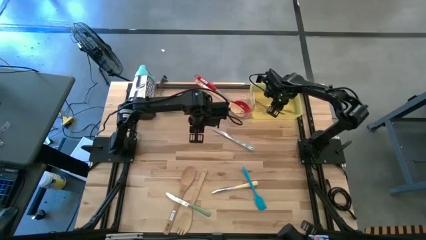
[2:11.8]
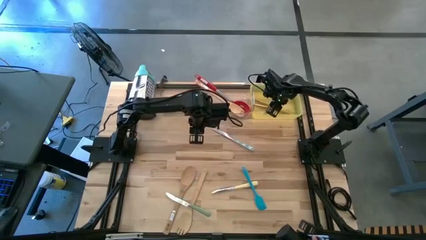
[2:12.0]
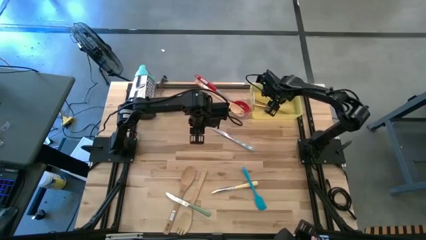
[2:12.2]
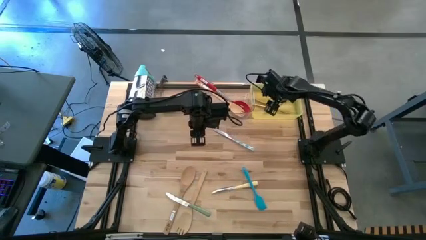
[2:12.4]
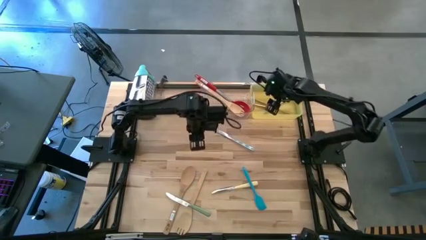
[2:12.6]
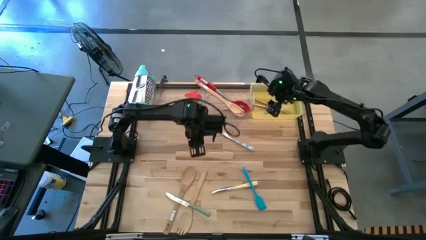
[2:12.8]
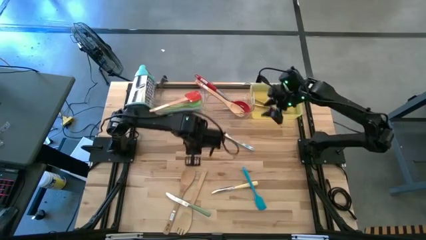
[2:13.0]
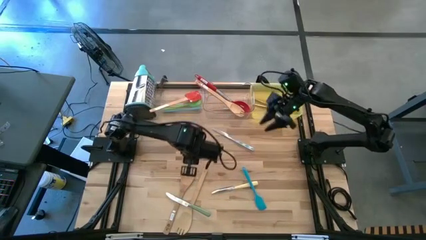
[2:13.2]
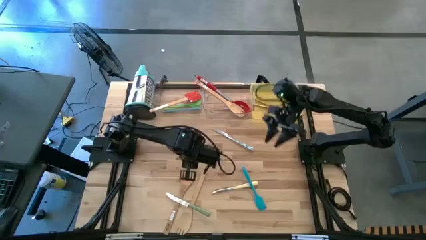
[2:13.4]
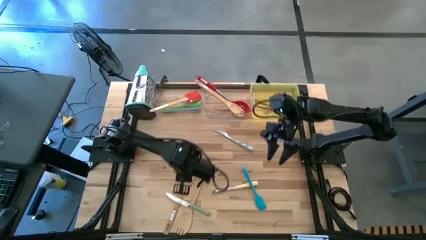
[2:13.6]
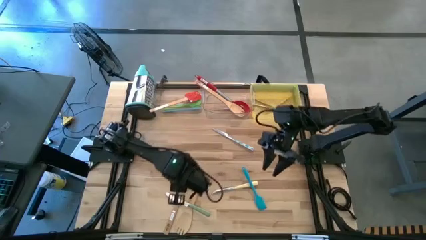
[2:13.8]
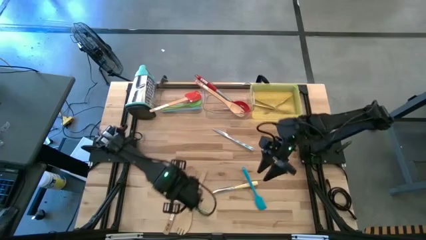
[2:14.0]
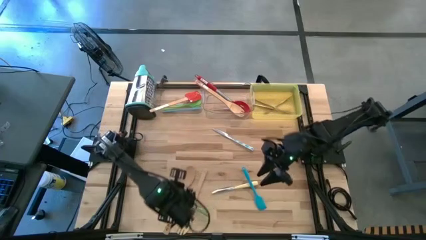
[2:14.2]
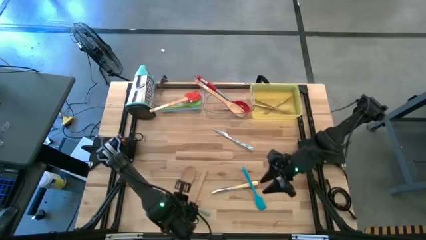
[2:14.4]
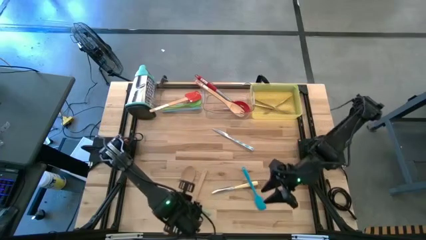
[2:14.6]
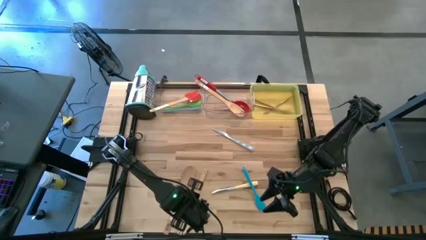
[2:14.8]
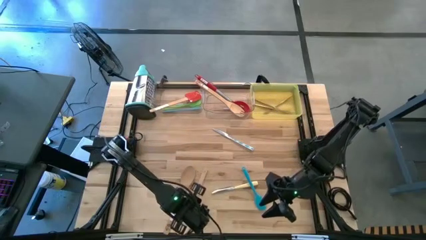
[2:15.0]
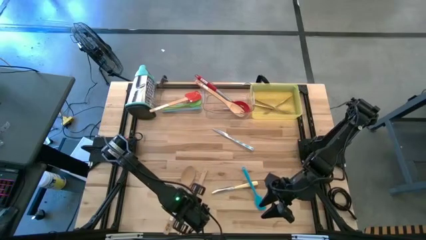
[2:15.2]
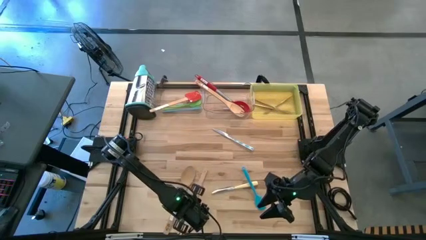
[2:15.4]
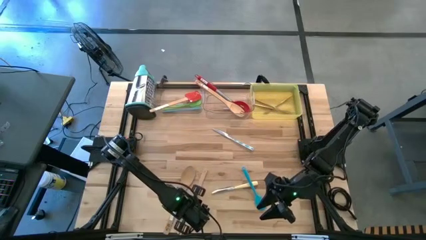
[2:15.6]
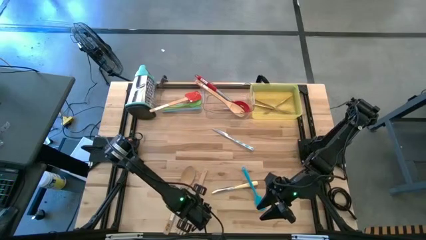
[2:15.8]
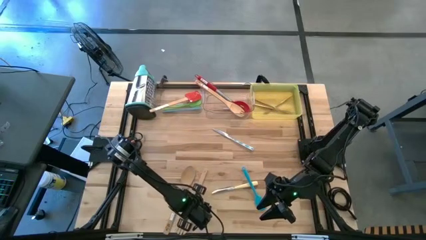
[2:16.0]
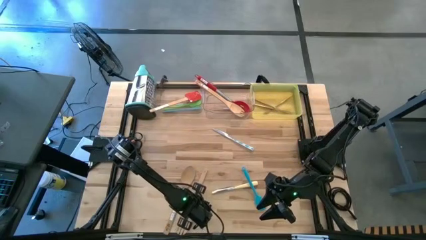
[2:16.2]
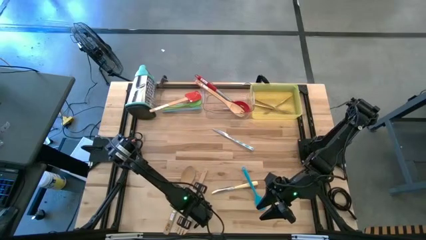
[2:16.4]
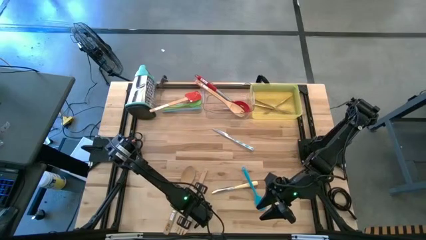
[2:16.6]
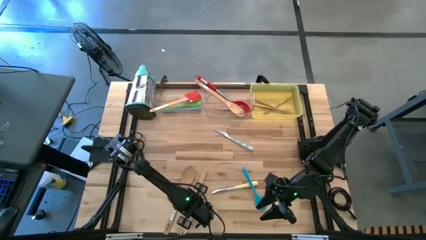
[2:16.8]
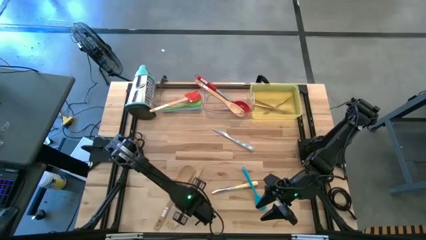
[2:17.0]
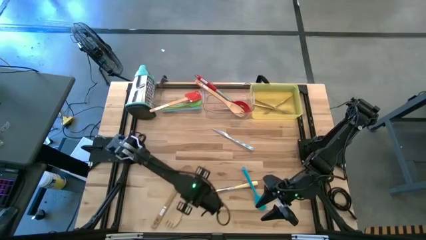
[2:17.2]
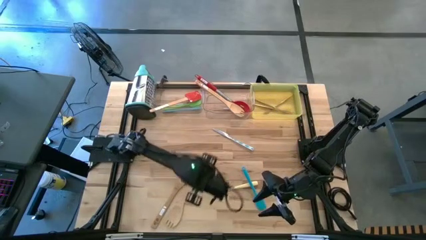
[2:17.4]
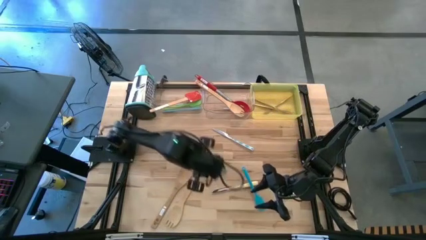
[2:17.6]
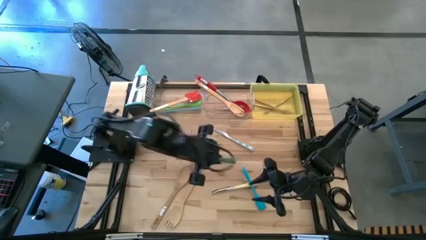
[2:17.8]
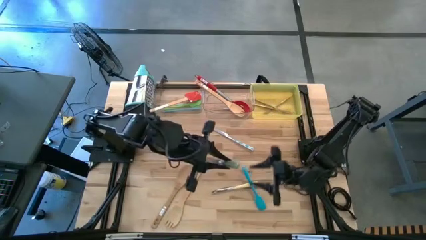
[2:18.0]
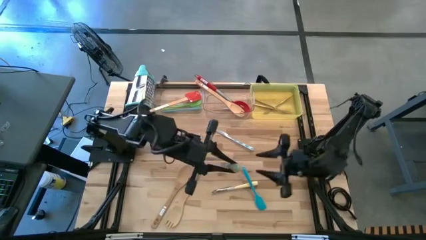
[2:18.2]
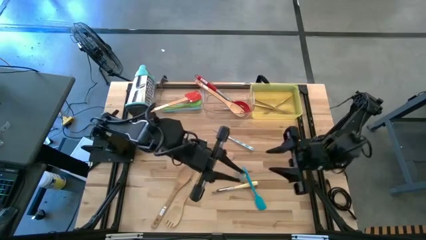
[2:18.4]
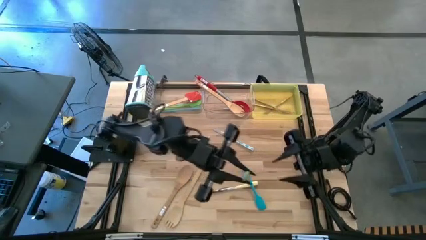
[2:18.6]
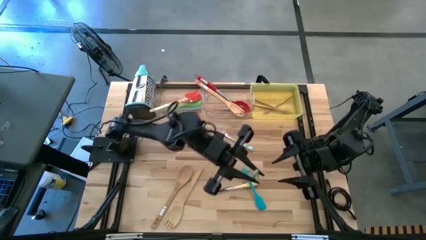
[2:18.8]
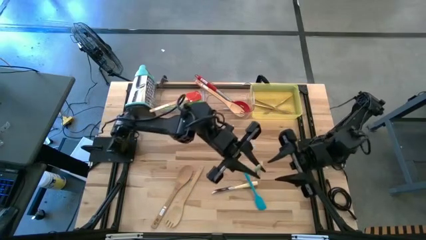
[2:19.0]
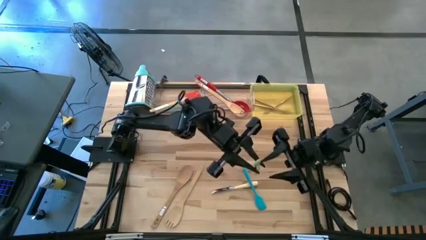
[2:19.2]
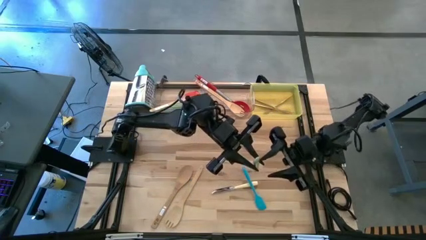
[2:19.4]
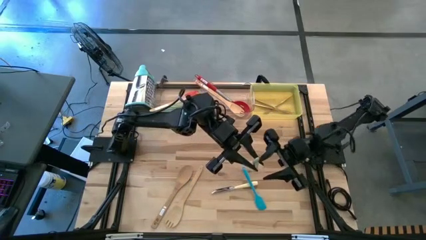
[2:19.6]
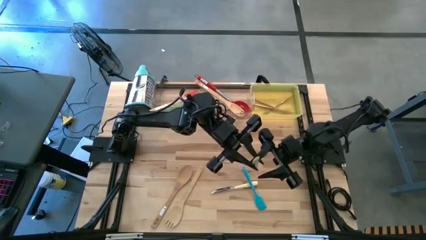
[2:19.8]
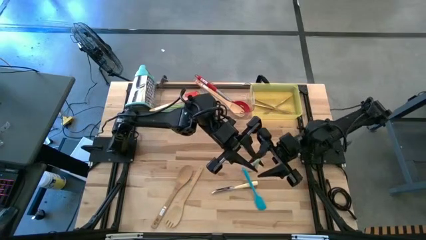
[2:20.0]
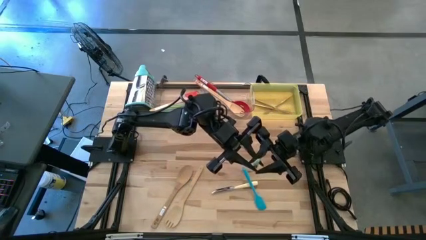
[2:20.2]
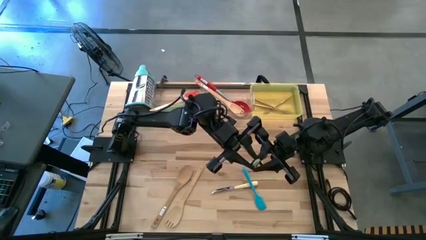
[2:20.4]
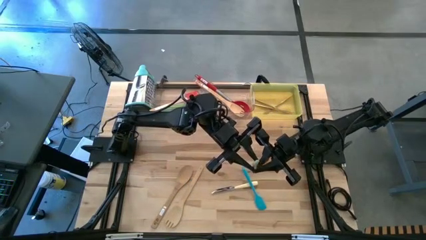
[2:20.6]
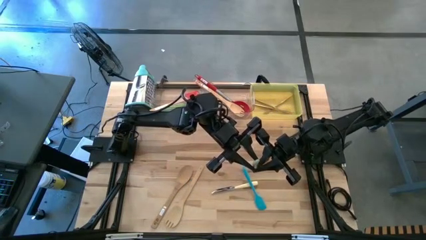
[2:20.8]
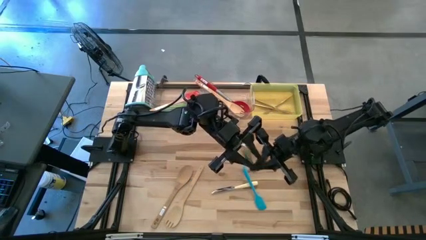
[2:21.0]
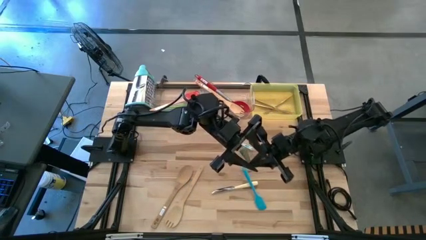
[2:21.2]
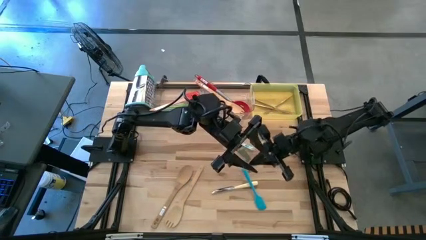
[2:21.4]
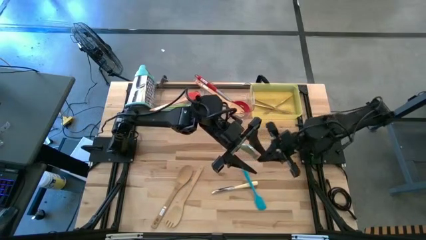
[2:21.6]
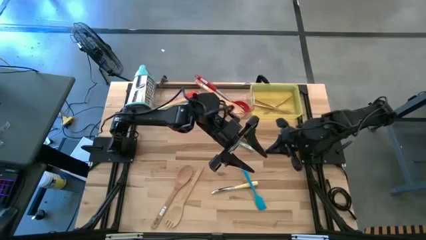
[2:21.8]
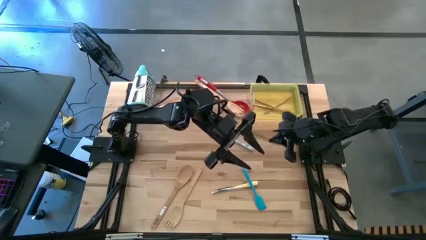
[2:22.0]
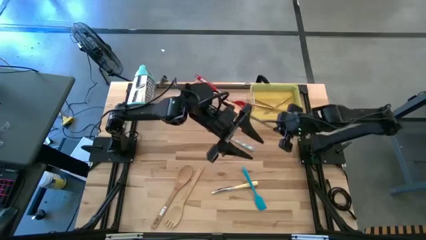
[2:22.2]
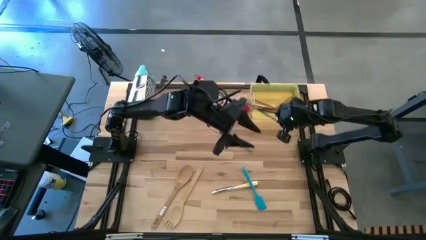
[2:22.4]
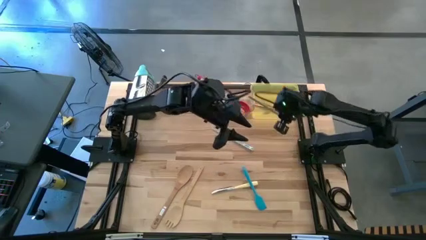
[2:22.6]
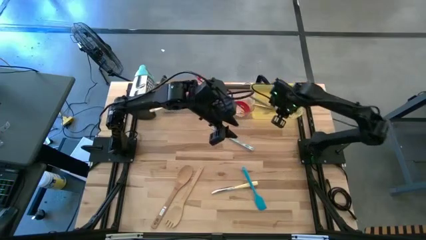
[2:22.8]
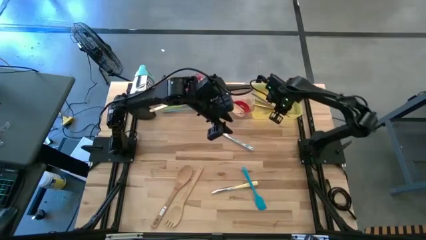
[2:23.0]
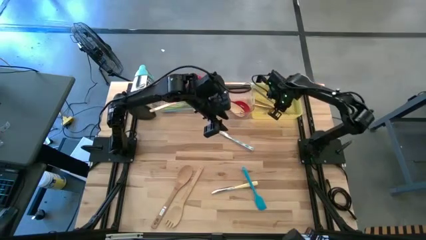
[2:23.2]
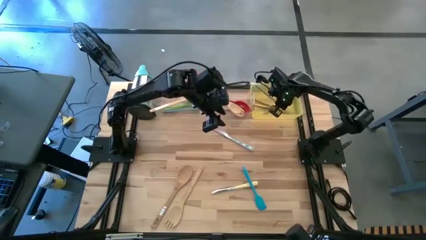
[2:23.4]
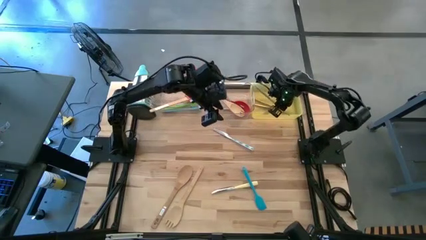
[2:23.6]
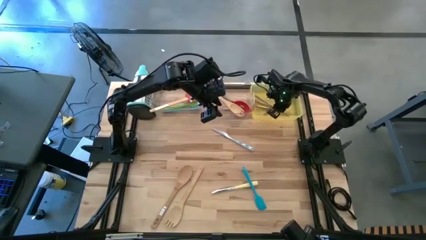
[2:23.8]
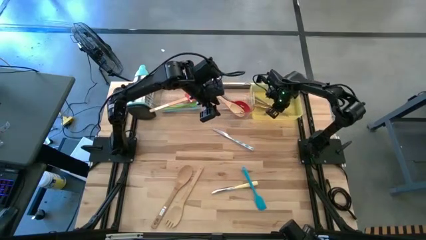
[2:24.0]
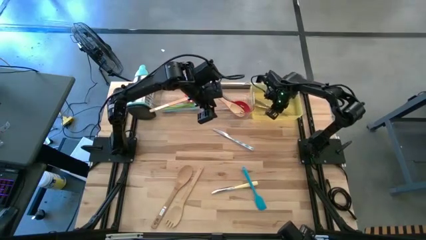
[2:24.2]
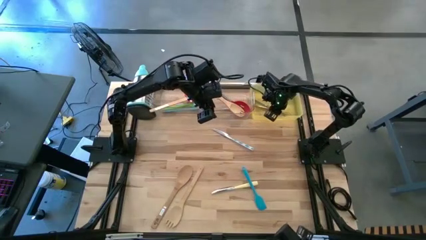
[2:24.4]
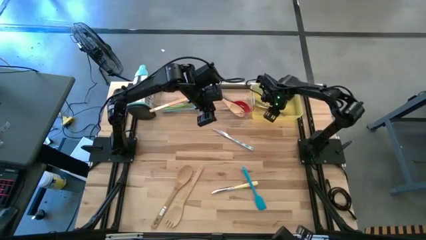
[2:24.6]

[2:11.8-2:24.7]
Task: Pick & Place Kitchen Items
Put the green knife into the yellow bin

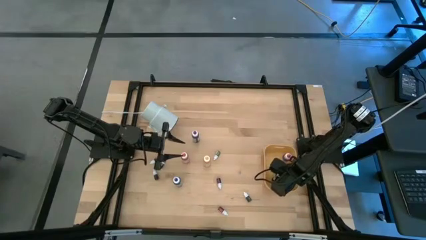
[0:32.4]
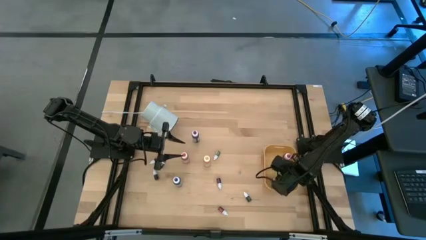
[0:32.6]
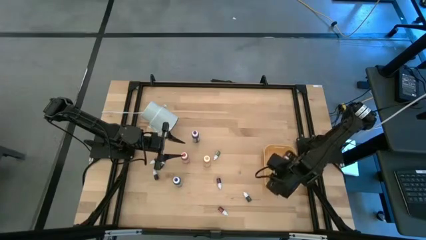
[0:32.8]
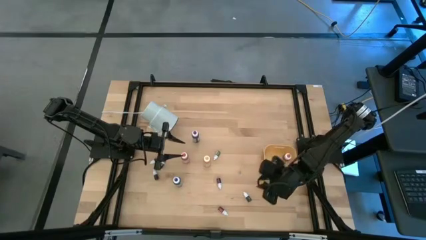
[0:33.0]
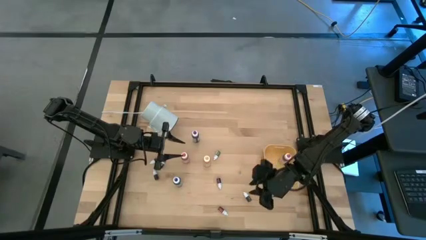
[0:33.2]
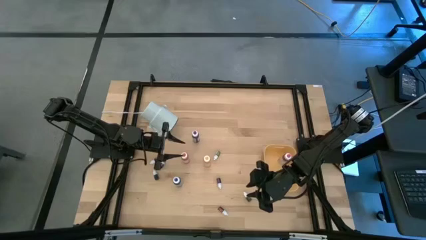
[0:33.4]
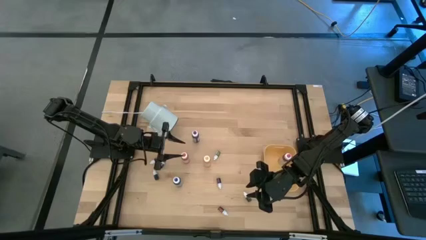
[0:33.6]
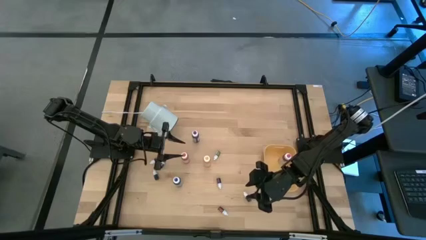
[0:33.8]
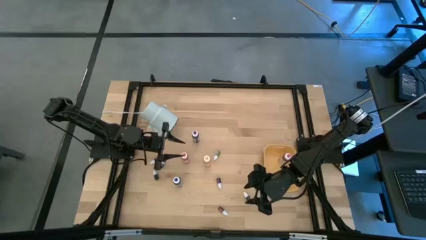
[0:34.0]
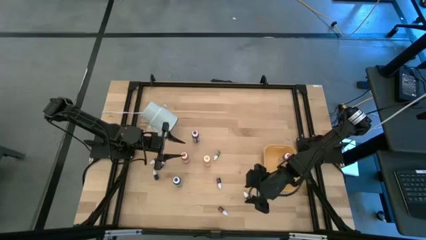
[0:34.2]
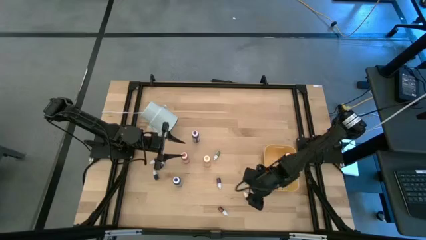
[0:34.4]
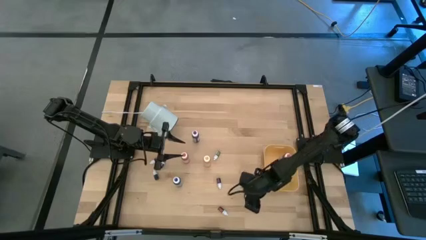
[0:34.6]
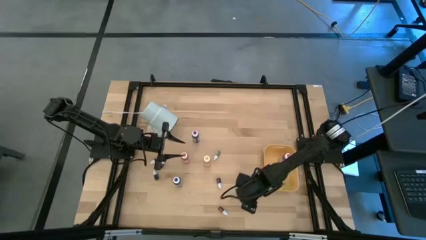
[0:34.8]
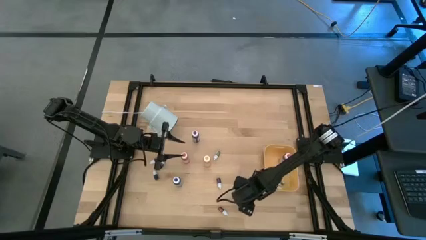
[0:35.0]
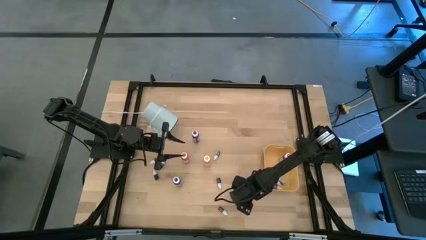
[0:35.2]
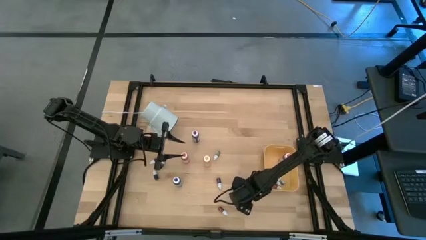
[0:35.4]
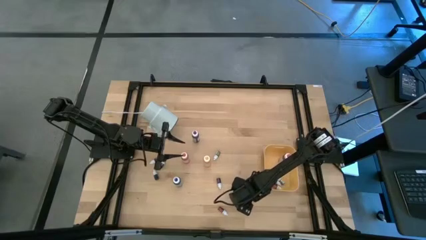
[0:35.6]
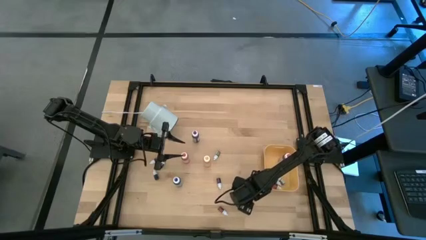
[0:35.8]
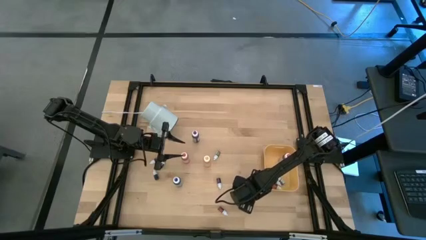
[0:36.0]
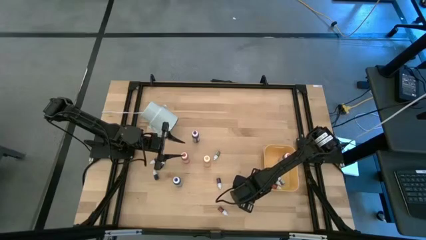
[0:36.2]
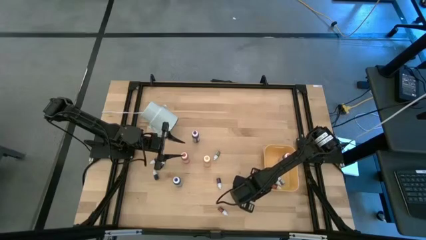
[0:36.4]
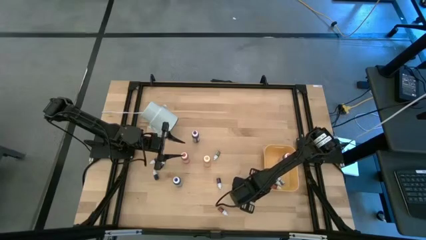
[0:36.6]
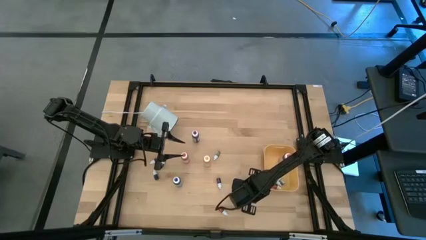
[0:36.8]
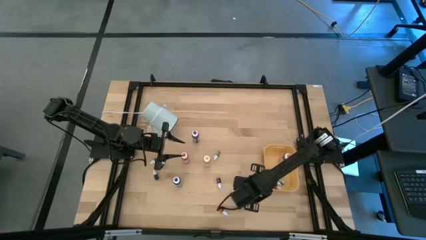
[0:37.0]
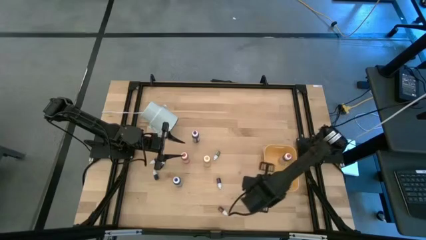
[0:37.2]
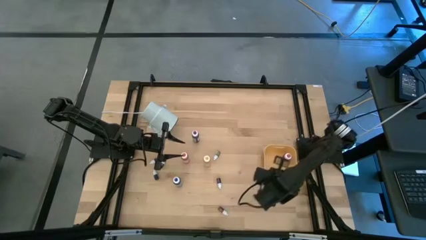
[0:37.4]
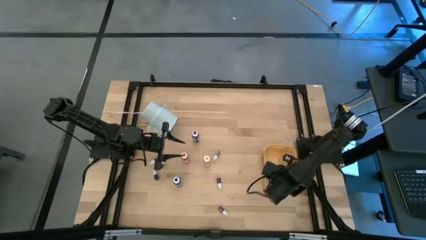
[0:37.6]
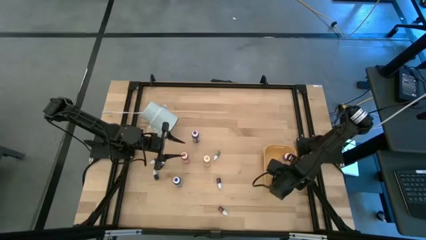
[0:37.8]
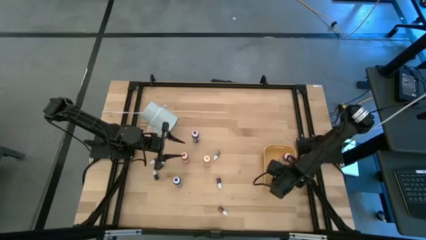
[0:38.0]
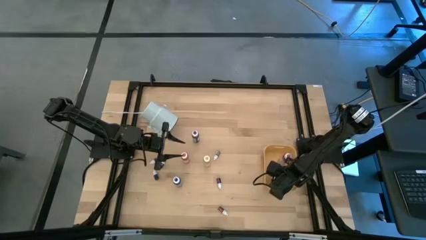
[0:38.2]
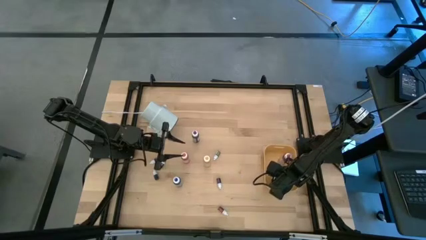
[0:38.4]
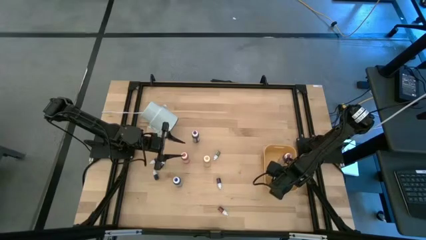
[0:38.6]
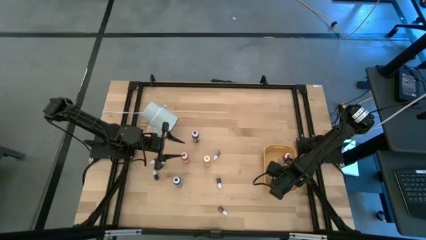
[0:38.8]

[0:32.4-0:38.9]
Task: Pick & Place food coloring
Put the small dark green food coloring bottle into the yellow bin
